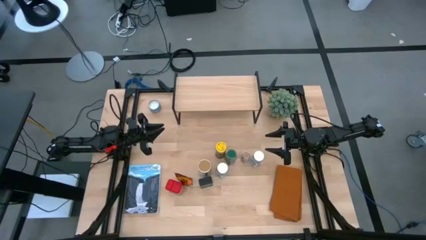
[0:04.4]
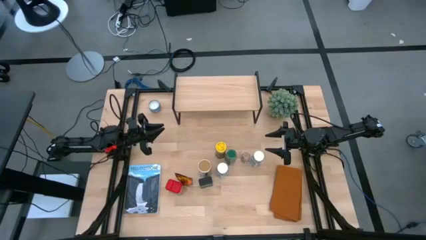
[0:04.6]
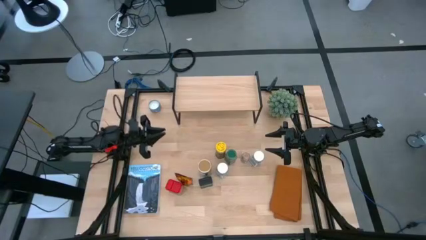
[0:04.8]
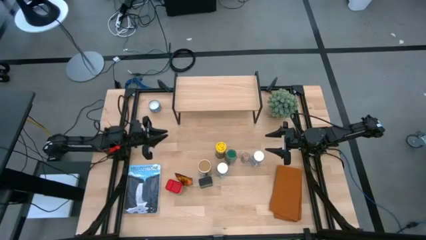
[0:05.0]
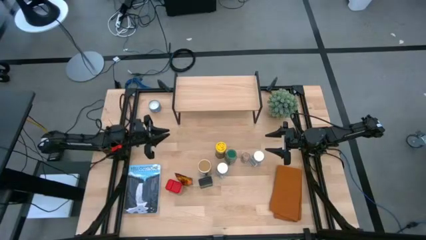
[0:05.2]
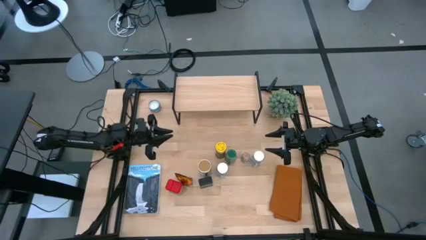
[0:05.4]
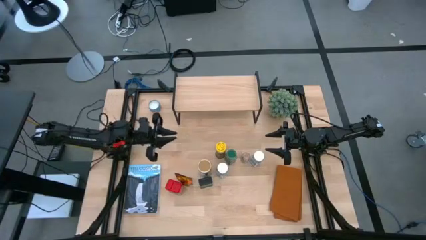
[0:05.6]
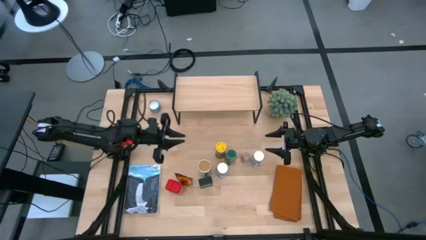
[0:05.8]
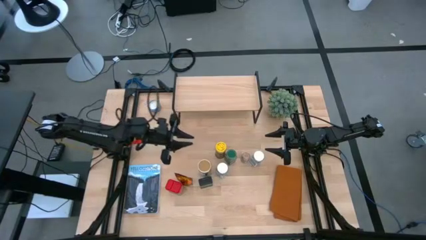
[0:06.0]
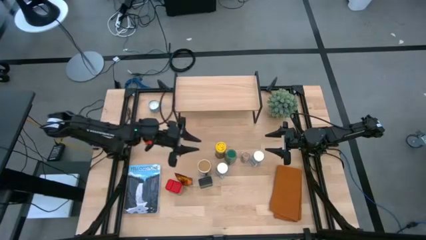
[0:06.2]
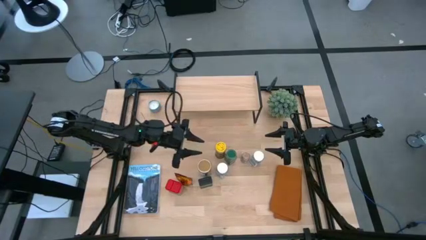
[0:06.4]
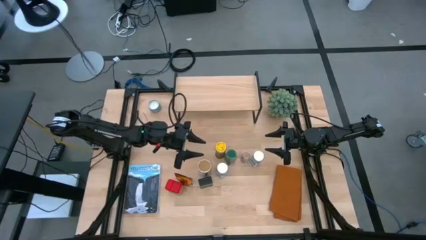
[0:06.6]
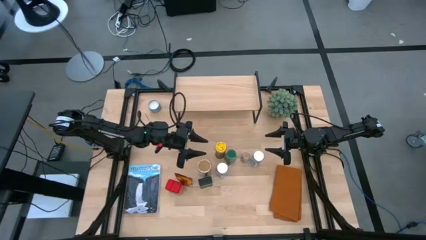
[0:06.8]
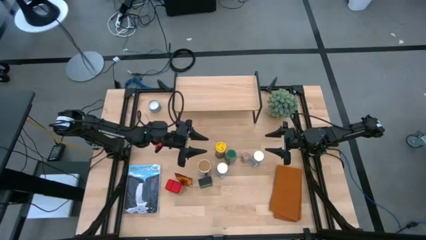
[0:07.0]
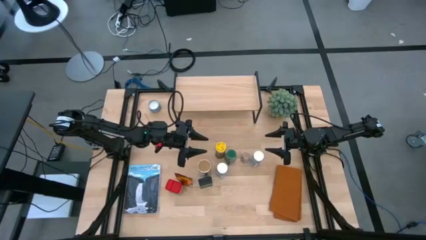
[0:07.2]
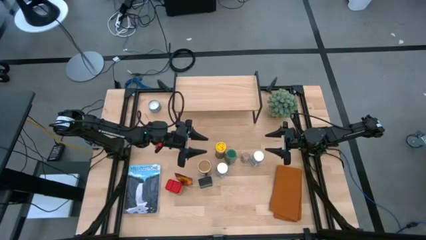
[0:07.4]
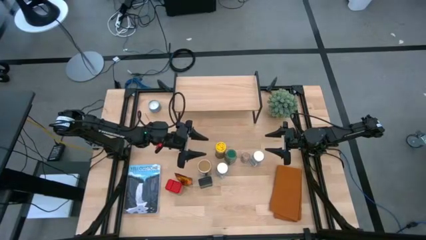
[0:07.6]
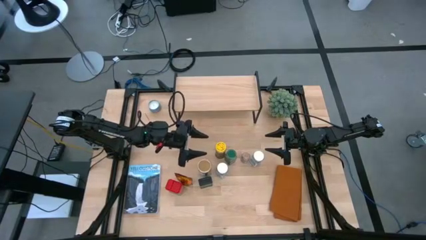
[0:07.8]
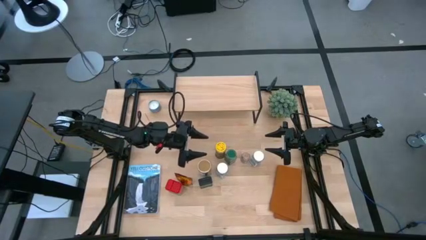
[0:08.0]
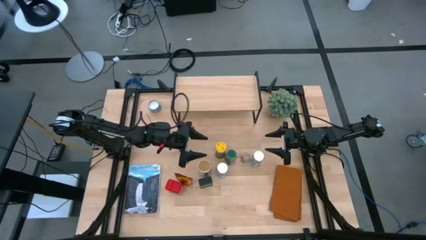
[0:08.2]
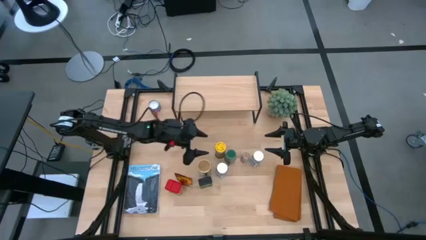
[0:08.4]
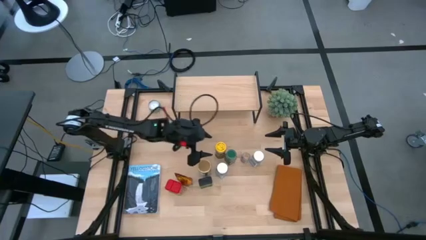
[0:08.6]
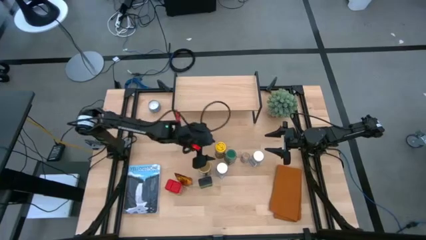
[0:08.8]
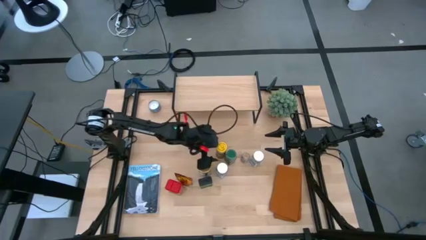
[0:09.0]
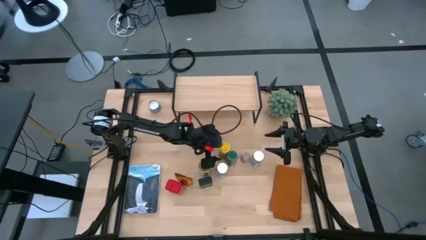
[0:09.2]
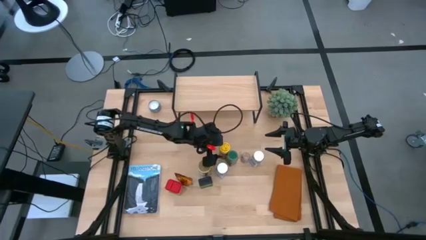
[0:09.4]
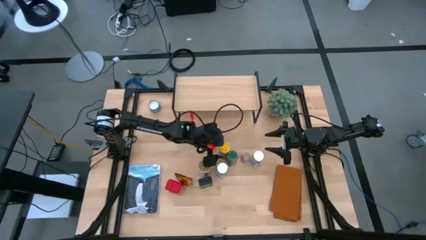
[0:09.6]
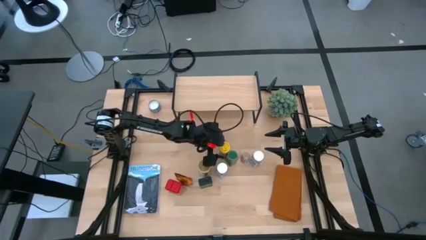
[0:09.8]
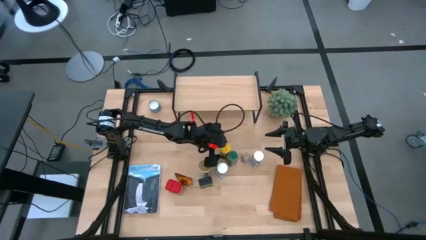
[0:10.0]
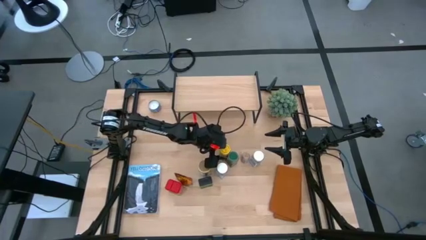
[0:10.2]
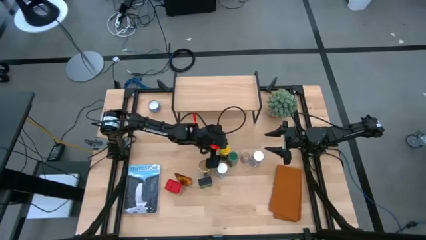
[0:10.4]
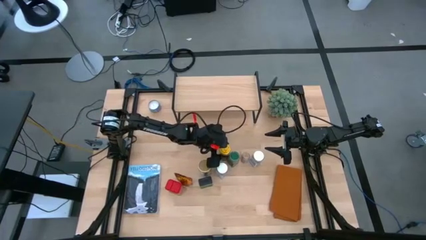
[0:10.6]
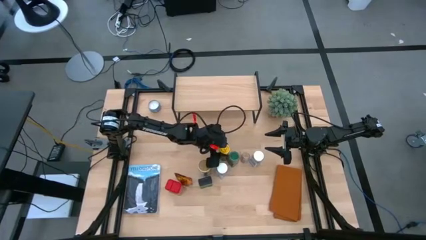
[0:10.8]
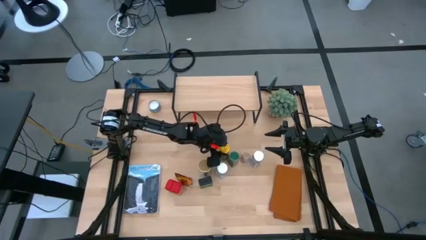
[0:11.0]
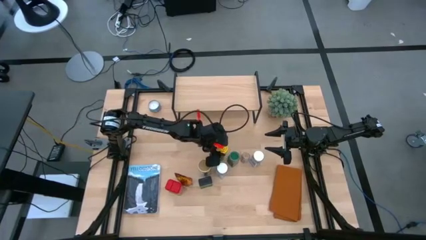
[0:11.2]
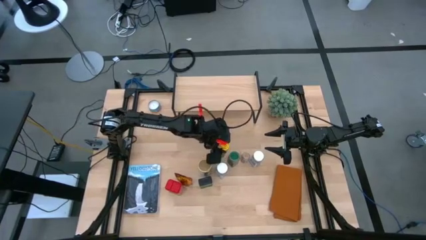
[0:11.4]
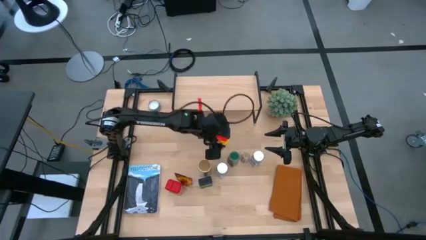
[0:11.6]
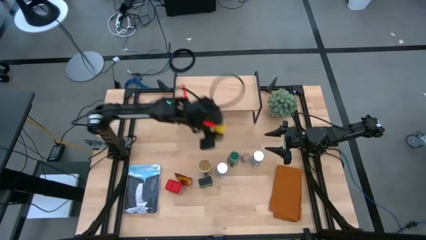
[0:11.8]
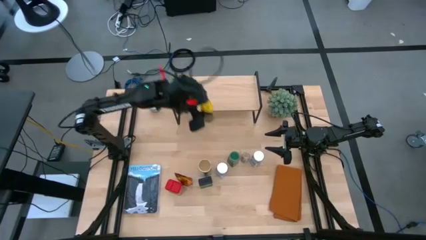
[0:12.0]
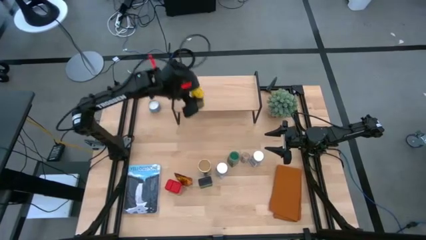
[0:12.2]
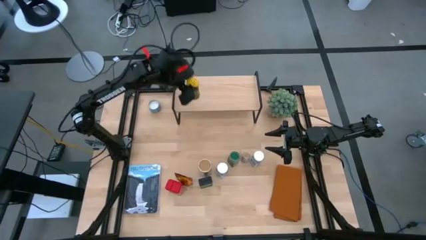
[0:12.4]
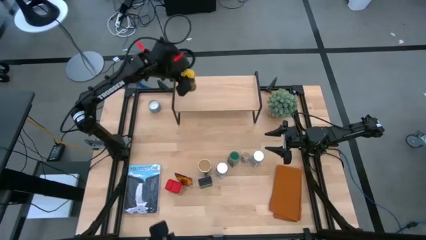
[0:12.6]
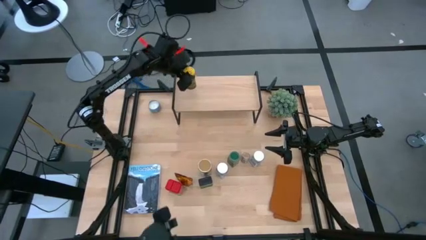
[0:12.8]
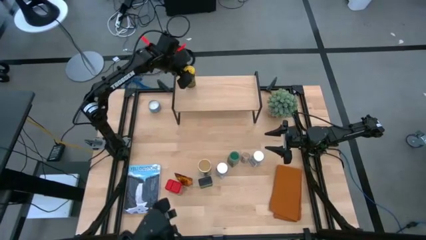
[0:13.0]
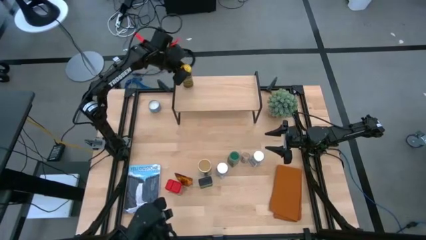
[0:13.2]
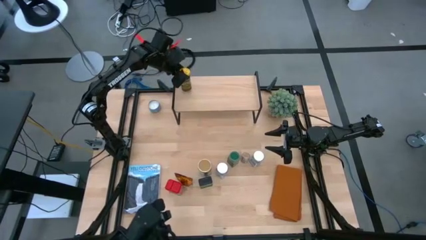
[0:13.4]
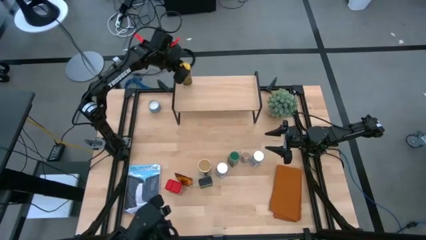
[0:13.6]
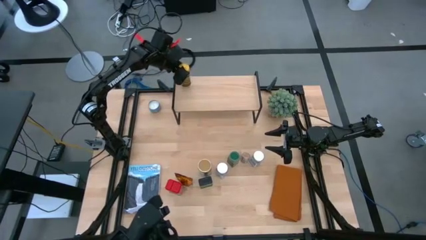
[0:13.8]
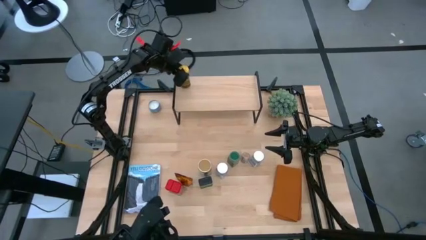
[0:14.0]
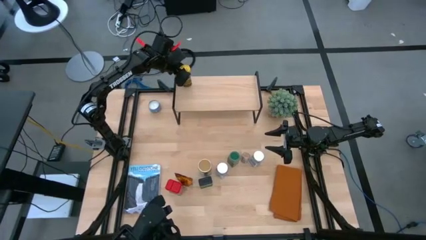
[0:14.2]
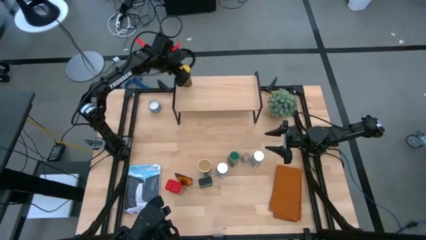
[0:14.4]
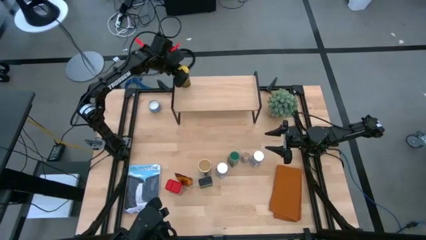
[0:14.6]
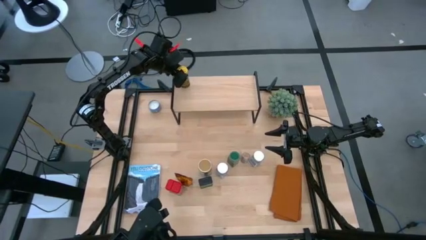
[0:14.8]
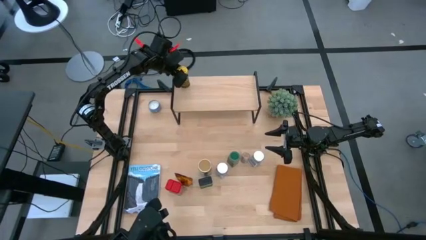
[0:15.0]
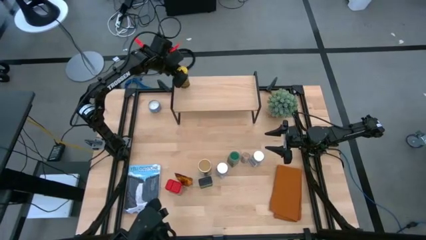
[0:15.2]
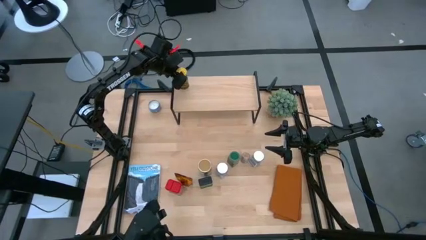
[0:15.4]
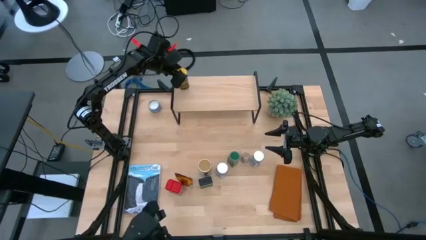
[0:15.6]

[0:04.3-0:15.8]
Task: Shelf spices
Put the yellow bottle seasoning on the shelf

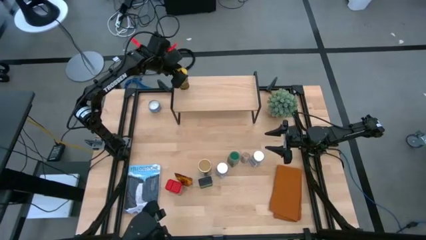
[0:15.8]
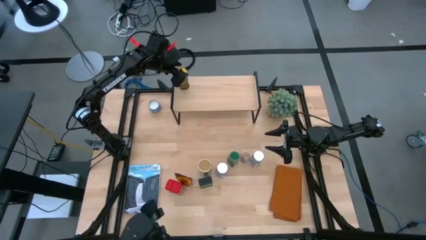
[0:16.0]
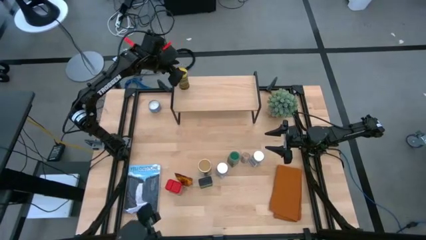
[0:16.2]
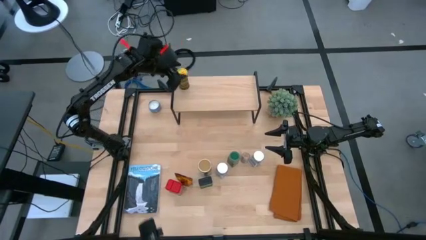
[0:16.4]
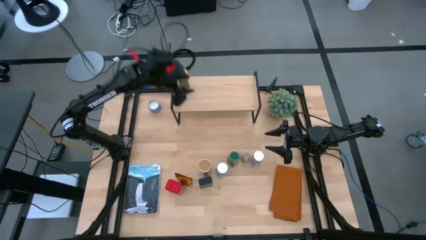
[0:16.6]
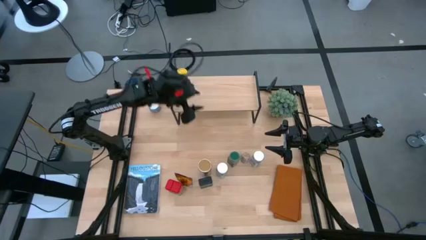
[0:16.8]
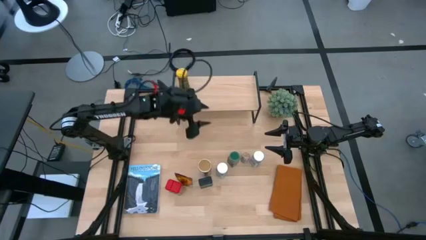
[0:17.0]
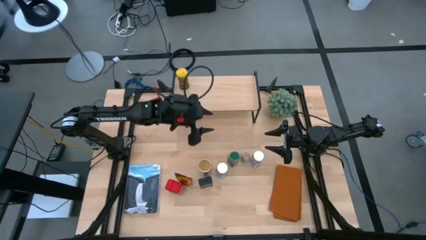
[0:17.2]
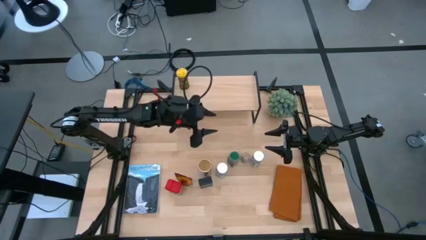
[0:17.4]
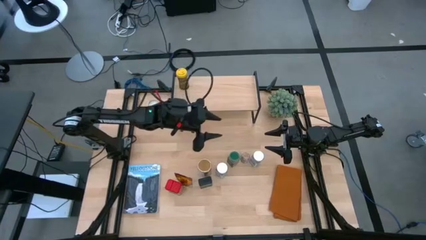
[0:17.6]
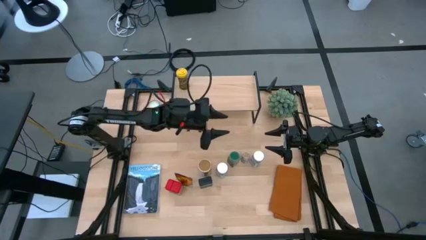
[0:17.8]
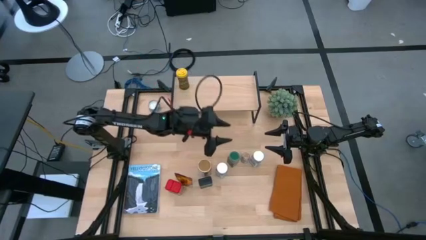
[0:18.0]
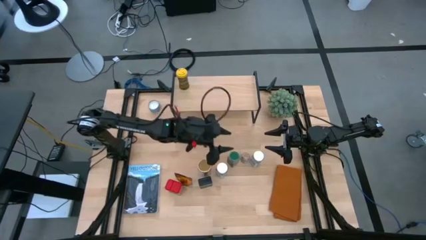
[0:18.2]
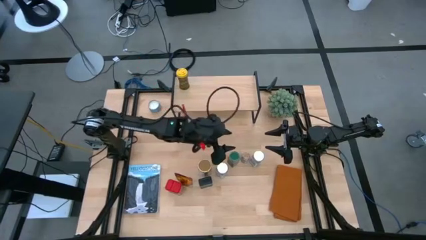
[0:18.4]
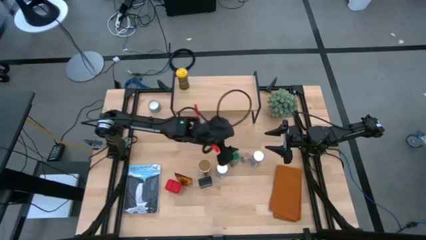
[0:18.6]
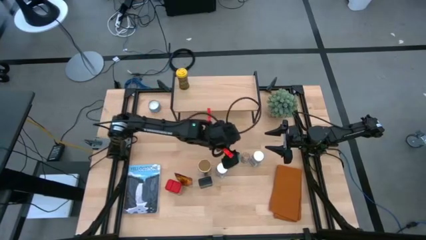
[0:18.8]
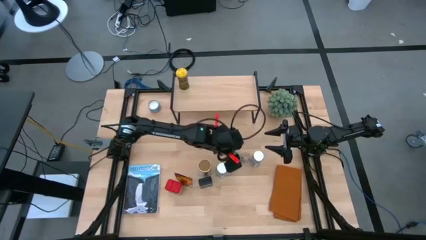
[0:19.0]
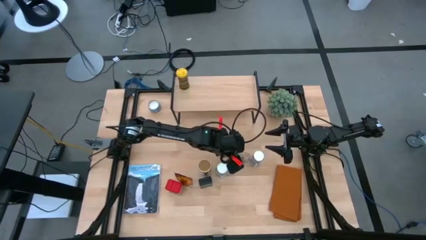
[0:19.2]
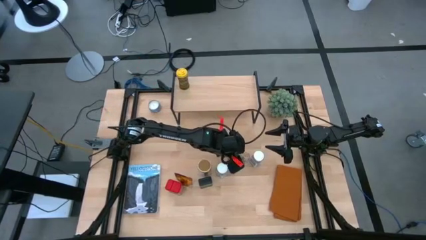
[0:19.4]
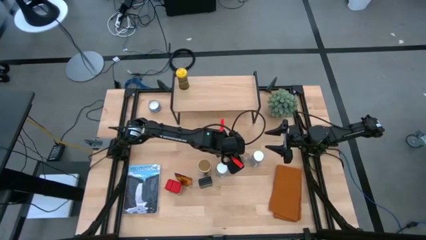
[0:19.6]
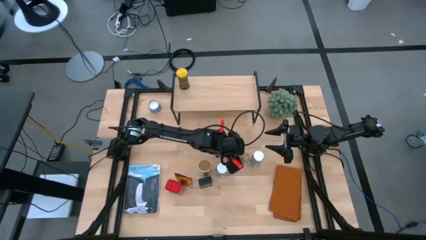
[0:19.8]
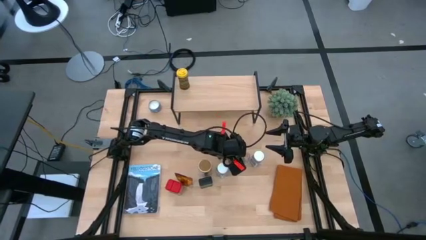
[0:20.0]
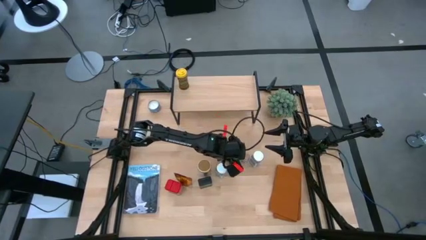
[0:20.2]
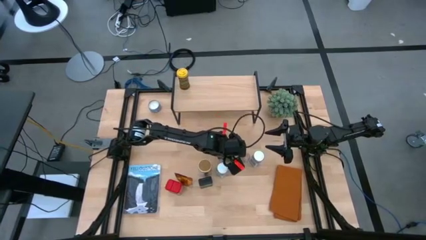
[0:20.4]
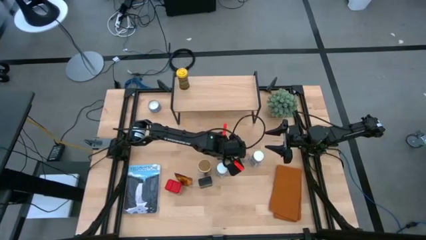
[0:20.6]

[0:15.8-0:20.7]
Put the green bottle seasoning on the shelf
